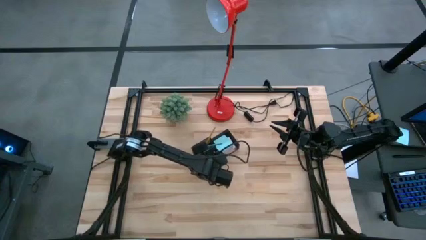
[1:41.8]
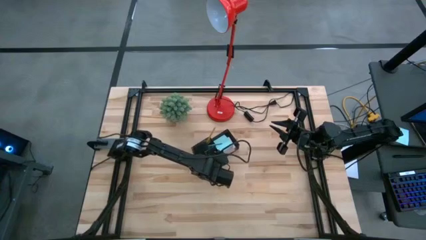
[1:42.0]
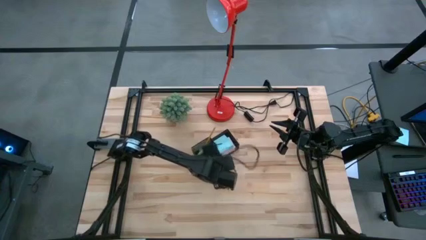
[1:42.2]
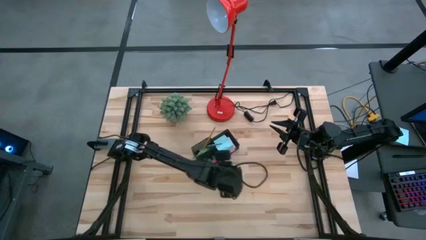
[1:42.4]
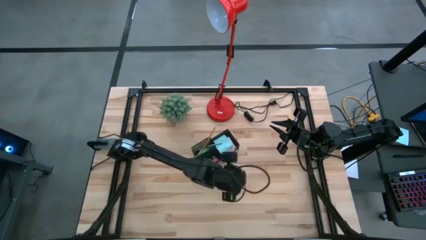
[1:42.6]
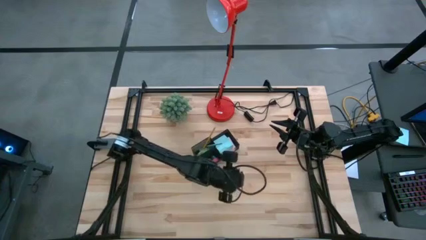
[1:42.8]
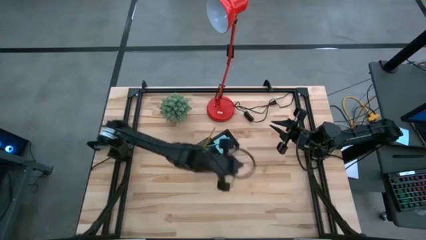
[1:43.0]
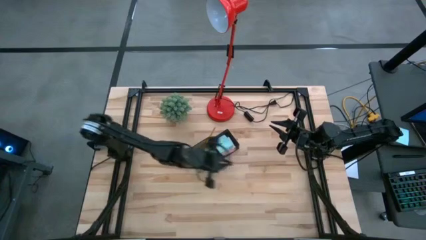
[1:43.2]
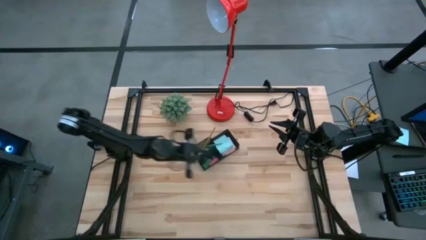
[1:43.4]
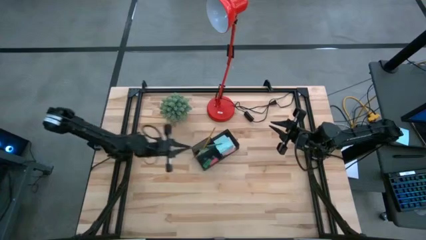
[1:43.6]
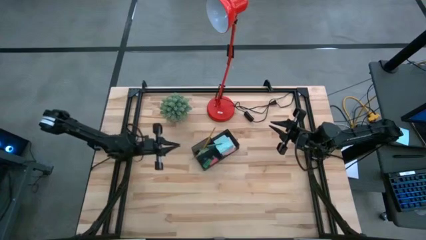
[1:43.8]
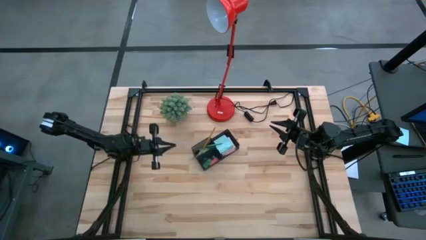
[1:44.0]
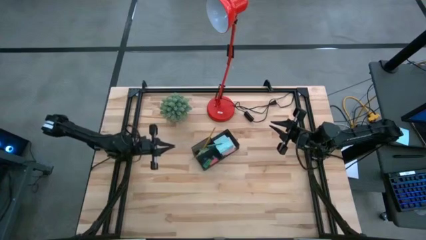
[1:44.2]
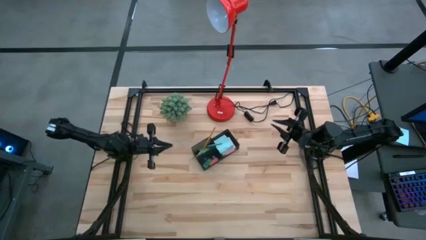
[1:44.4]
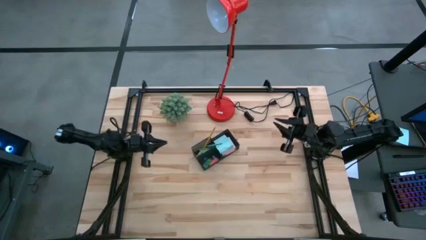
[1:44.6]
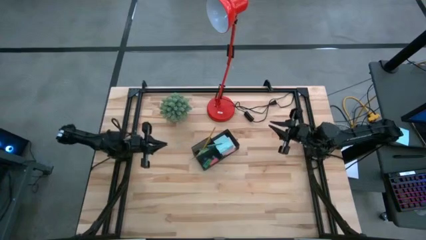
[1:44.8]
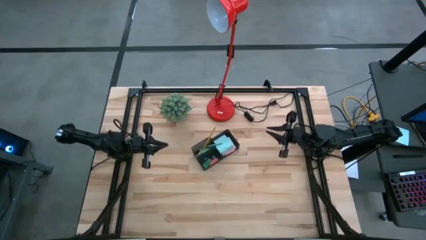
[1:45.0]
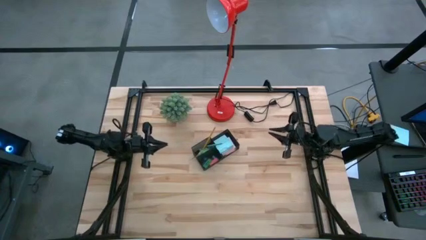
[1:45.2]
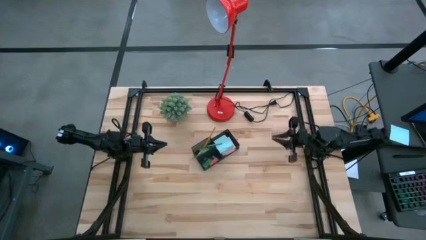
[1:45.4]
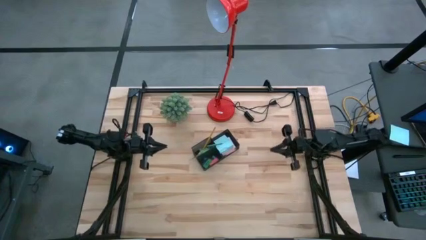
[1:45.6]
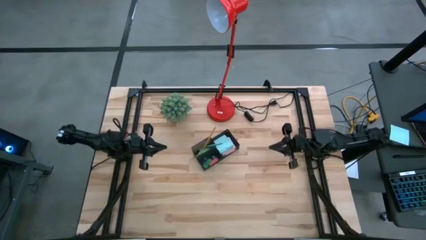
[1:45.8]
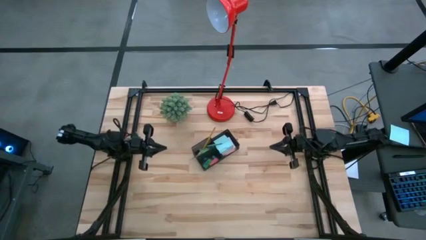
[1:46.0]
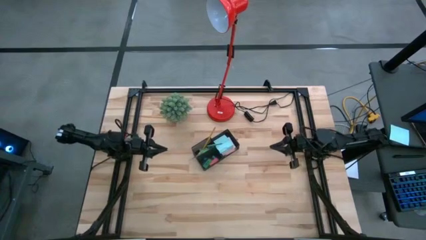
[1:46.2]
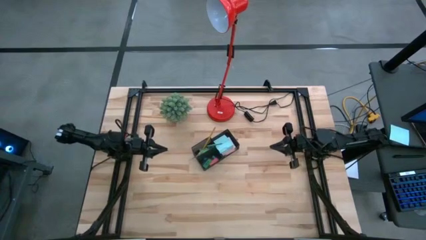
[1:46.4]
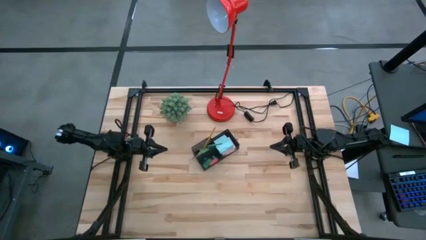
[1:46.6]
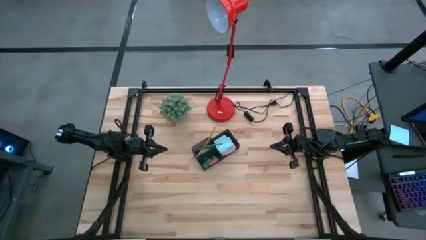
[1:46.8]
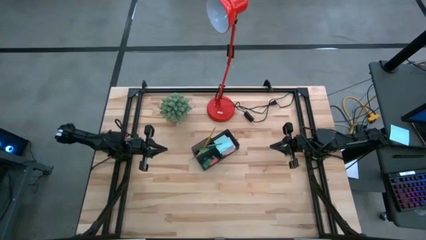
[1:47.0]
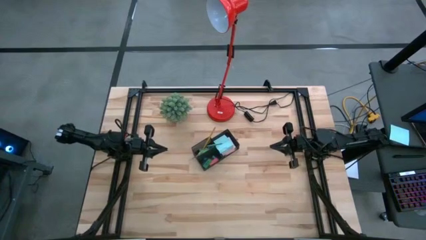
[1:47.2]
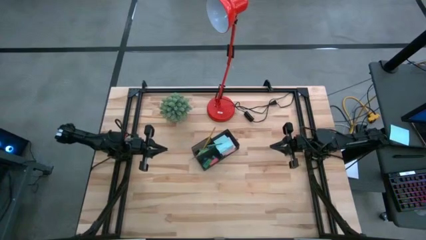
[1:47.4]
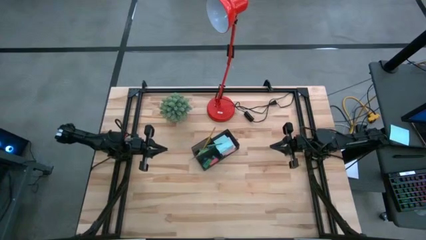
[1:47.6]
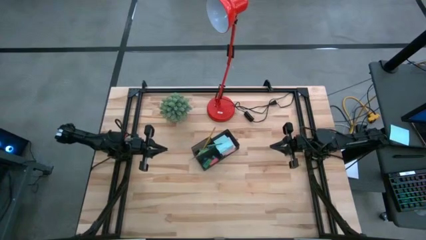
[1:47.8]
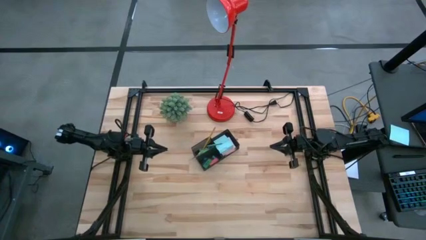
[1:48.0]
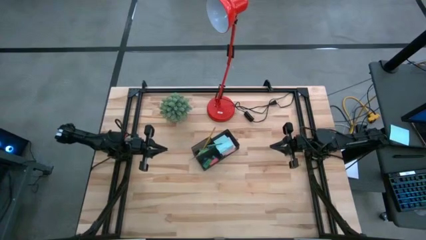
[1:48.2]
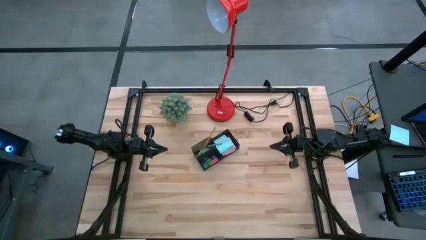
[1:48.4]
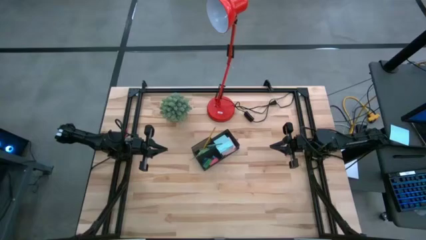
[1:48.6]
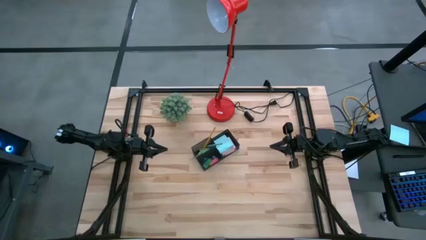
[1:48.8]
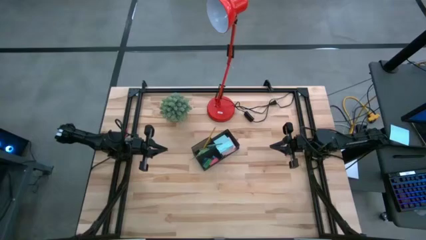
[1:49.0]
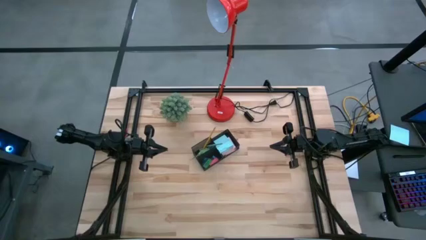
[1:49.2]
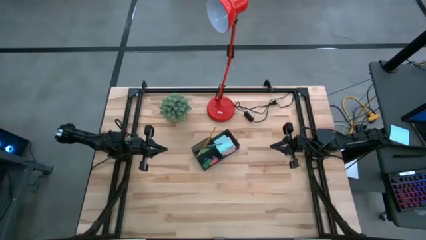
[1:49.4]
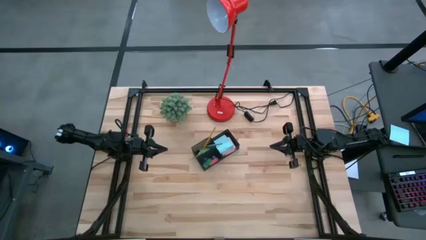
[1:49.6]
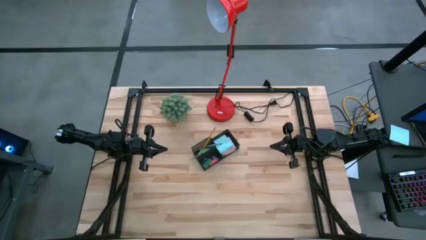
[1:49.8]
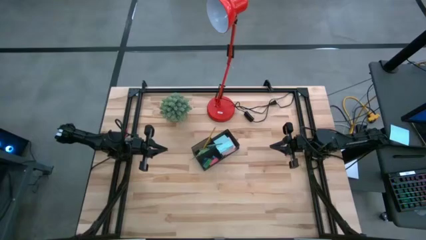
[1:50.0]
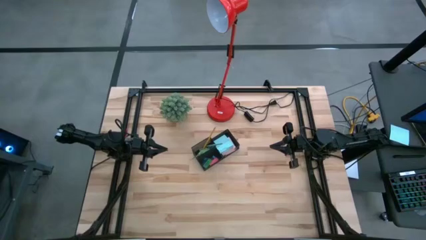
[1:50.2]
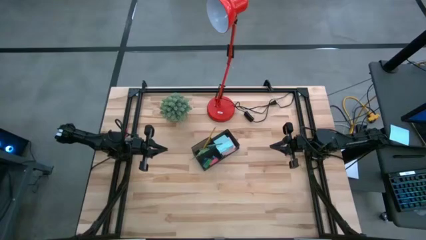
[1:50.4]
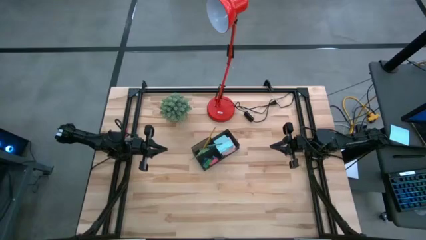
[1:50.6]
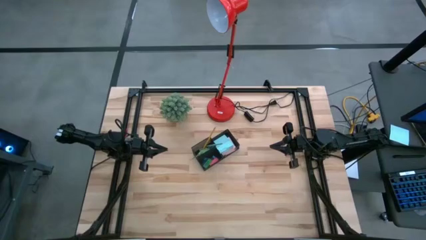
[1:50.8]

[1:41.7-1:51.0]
Task: Pick and place office supplies into organizer
Return to Home Position

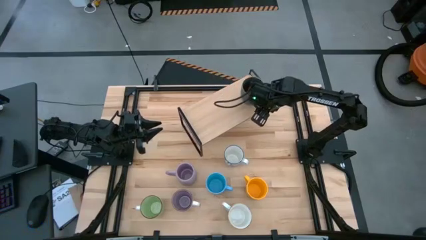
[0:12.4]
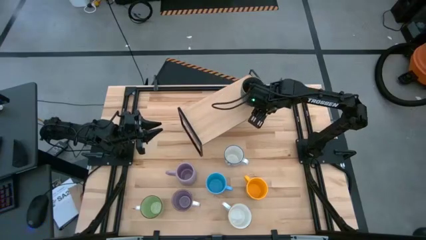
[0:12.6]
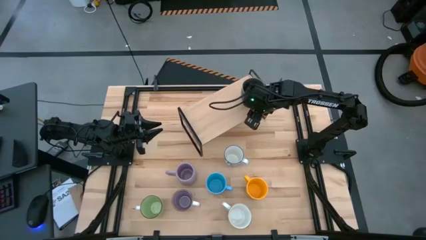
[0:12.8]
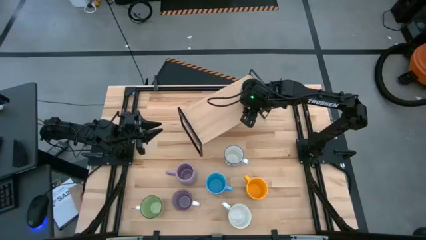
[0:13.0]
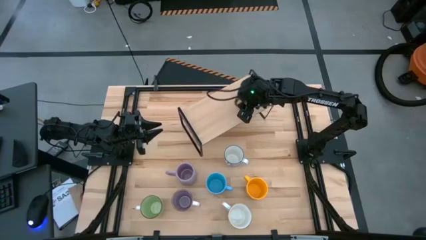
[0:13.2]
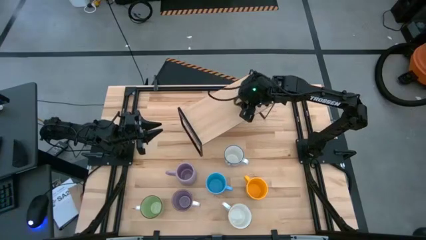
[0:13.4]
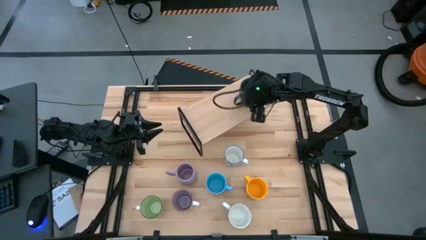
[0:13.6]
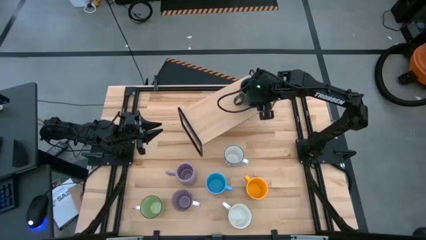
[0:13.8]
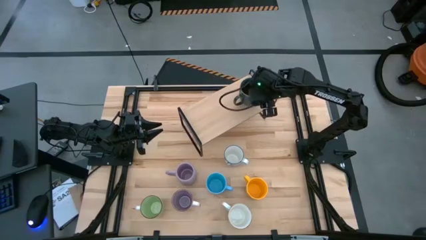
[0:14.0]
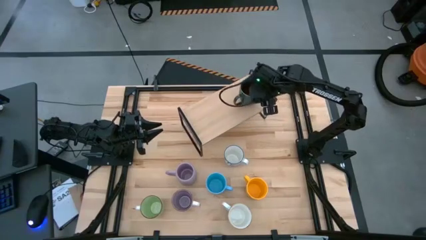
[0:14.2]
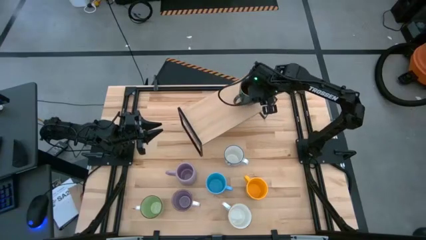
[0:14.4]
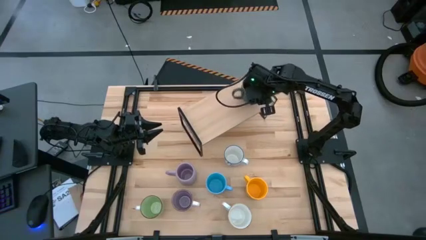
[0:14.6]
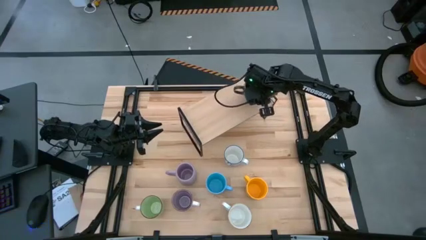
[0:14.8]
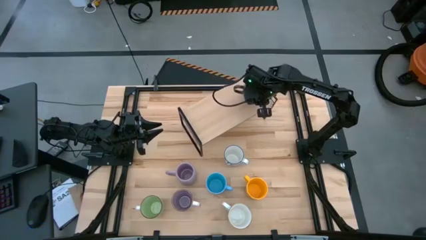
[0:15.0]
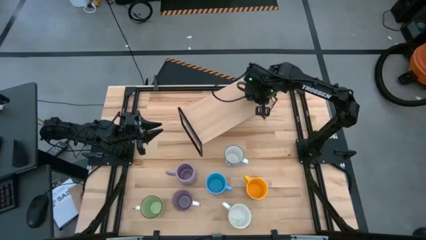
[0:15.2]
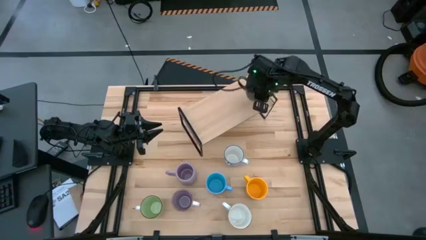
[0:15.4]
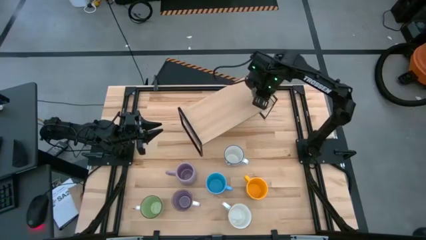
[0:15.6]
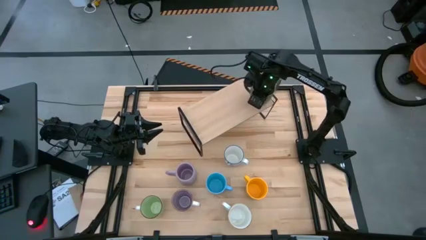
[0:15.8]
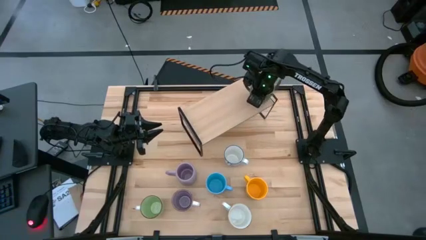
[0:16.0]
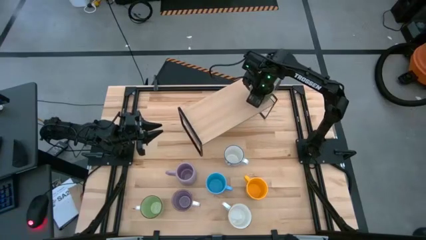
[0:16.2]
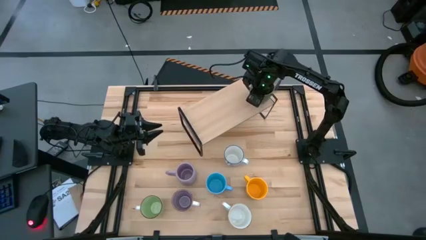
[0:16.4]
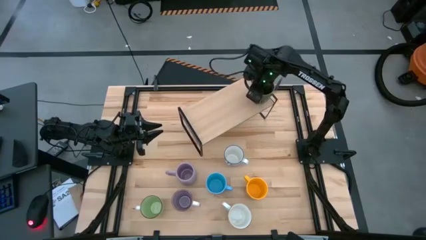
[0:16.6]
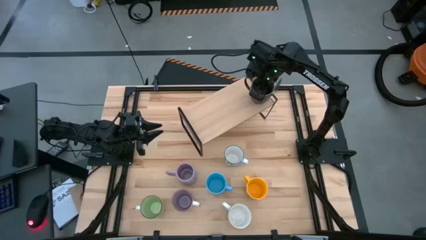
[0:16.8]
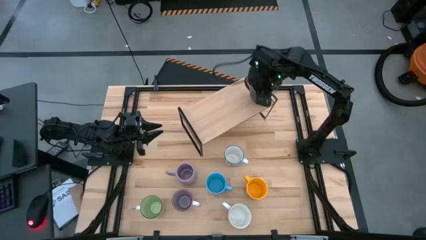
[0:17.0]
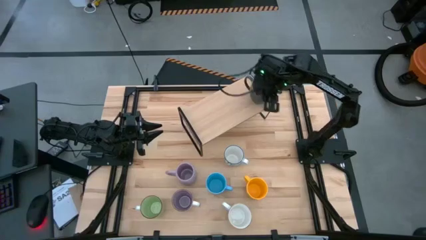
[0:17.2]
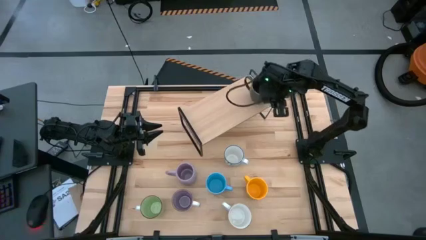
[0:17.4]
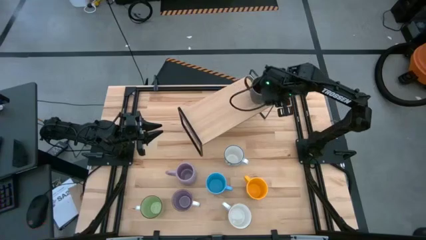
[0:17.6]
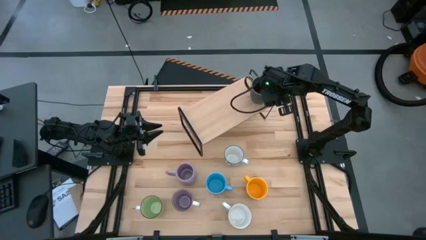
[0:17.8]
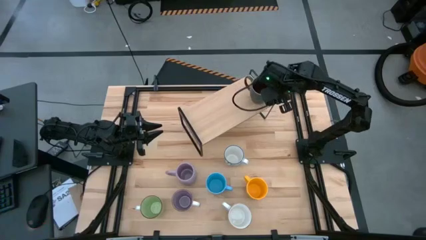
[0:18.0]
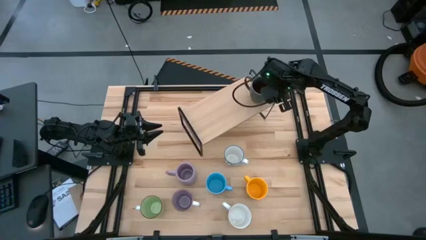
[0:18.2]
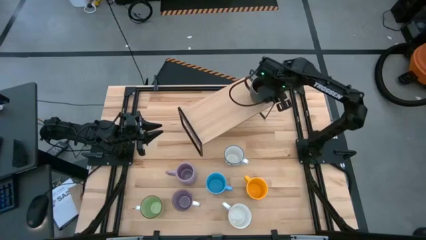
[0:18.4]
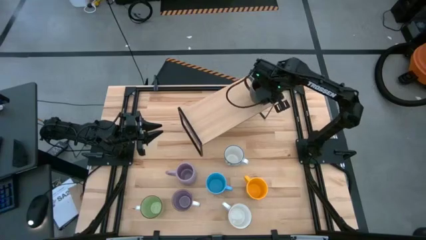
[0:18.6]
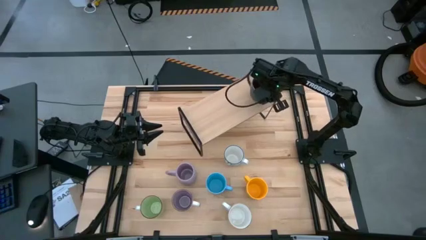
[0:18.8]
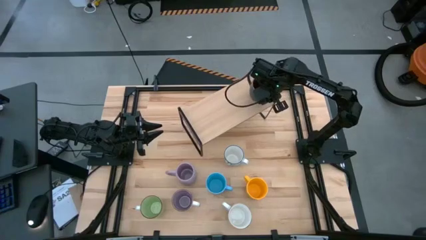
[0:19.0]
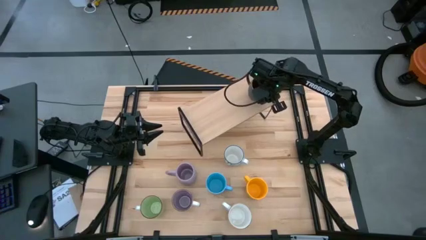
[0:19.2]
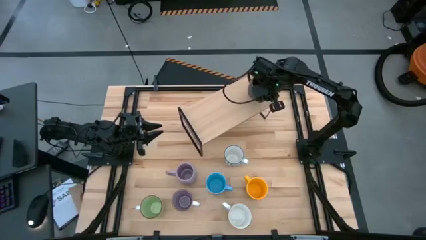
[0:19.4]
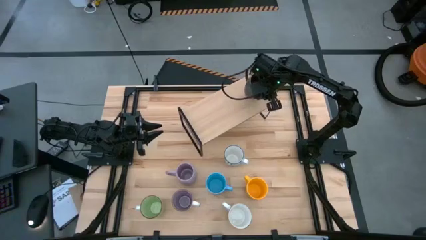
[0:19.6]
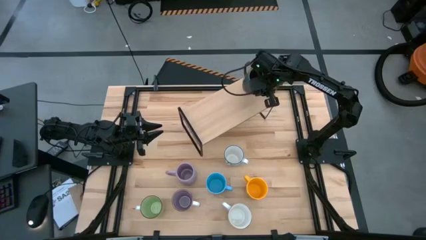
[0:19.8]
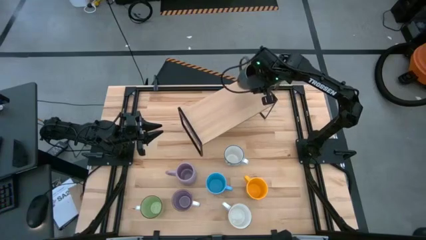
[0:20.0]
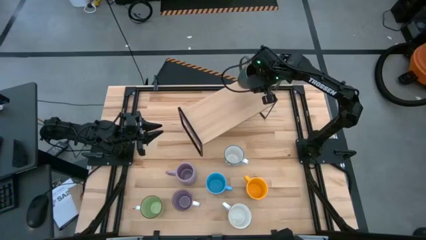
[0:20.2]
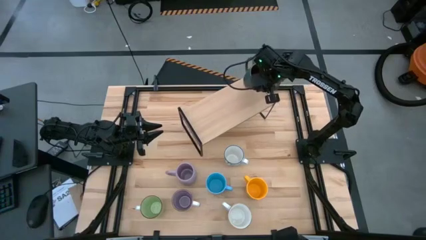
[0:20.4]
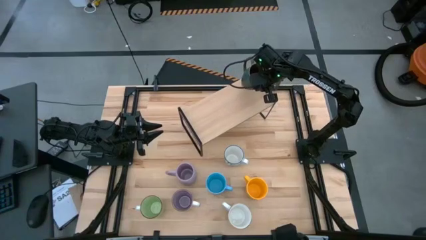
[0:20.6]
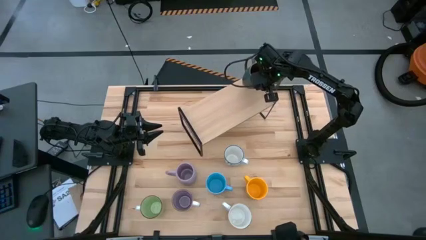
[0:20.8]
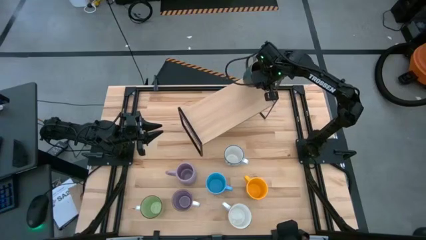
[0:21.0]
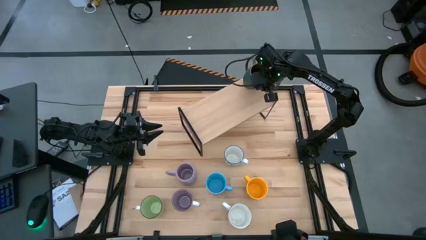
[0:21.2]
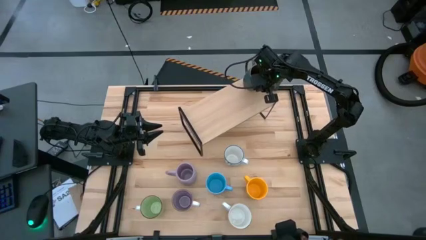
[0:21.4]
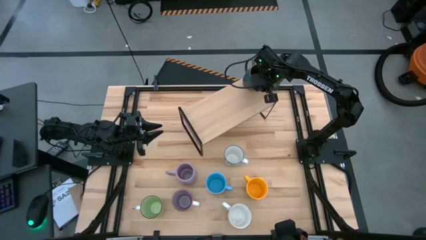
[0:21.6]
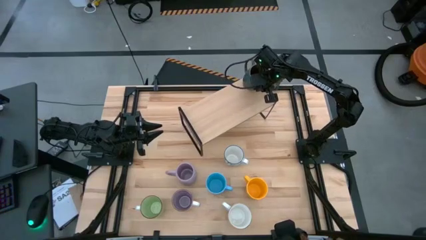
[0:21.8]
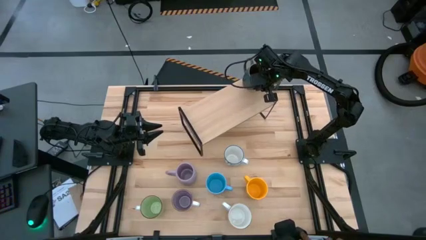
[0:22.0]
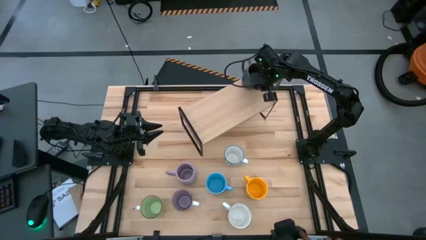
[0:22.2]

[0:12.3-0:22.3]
Task: Place coffee mugs
Put the dark blue cup on the shelf
